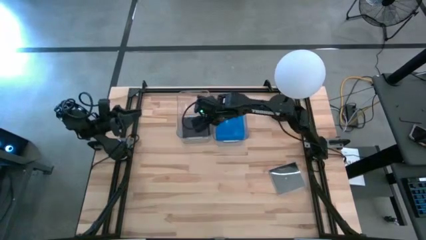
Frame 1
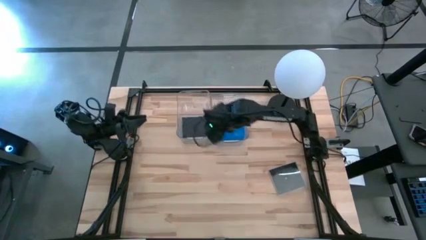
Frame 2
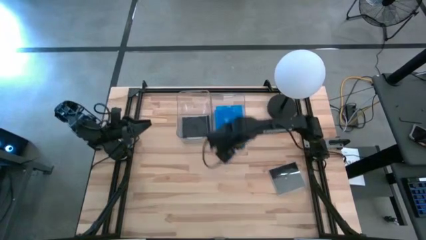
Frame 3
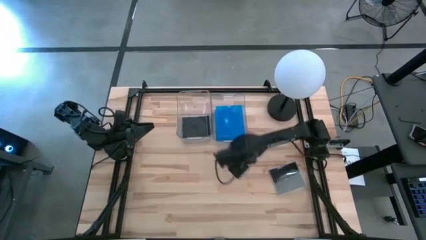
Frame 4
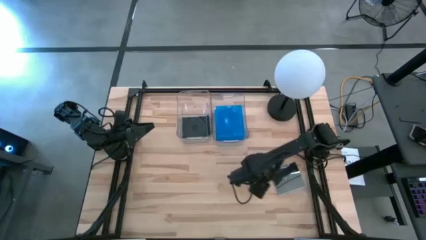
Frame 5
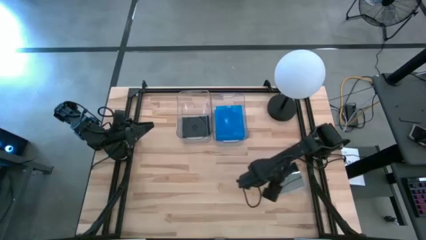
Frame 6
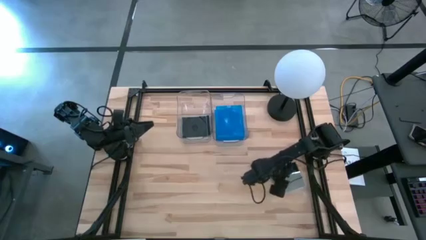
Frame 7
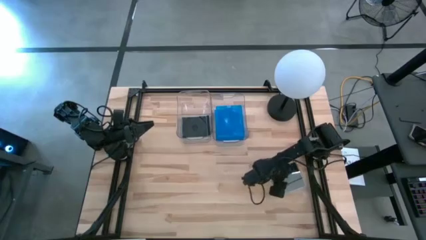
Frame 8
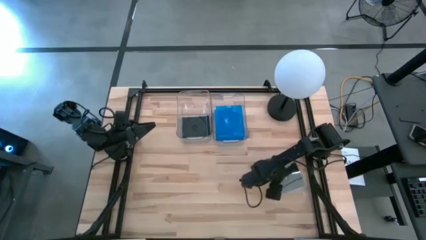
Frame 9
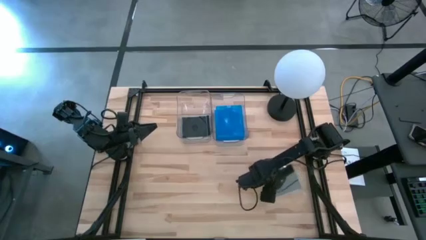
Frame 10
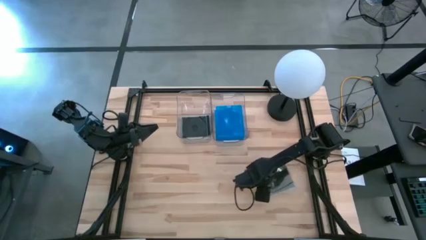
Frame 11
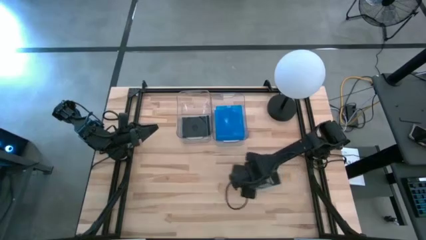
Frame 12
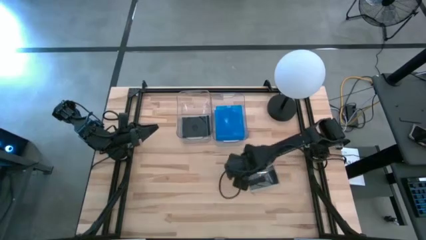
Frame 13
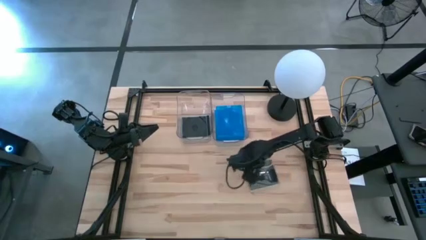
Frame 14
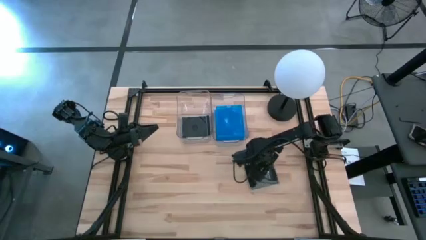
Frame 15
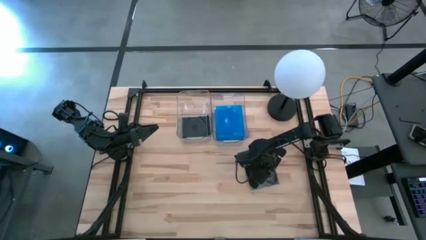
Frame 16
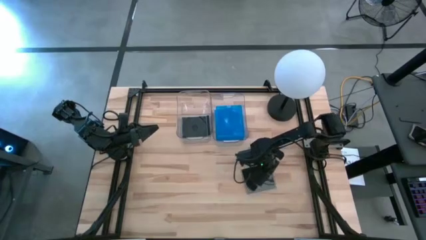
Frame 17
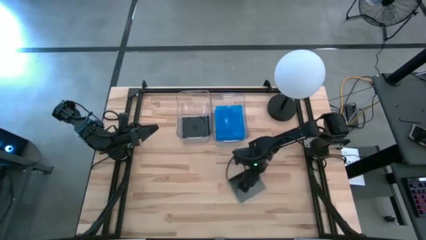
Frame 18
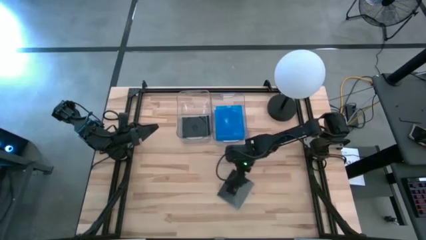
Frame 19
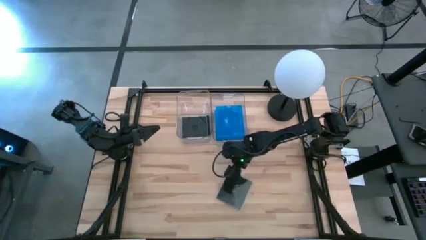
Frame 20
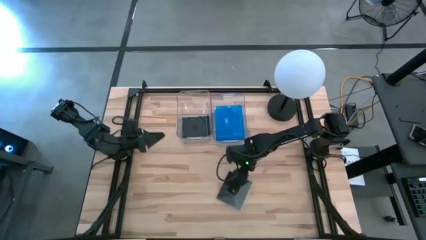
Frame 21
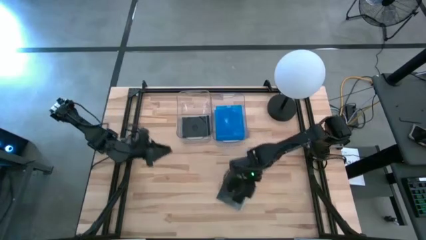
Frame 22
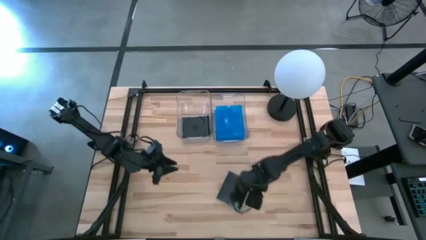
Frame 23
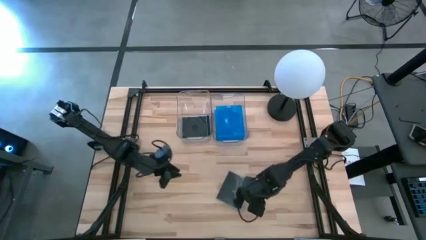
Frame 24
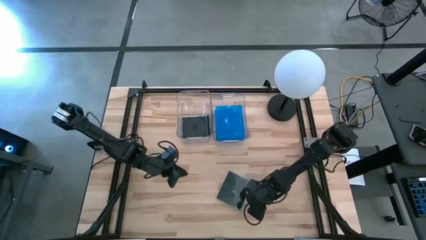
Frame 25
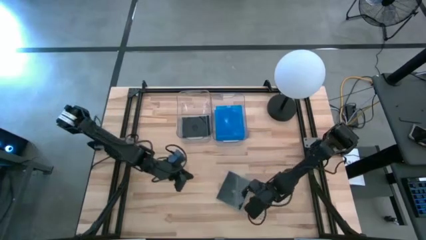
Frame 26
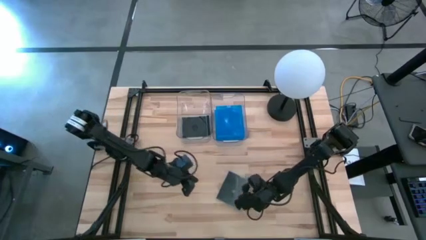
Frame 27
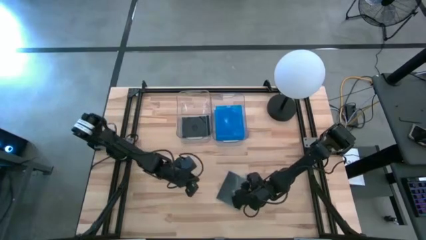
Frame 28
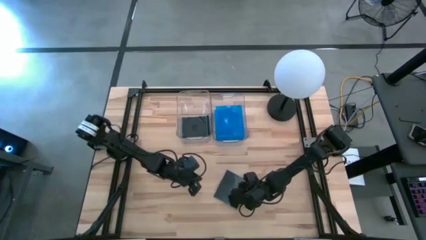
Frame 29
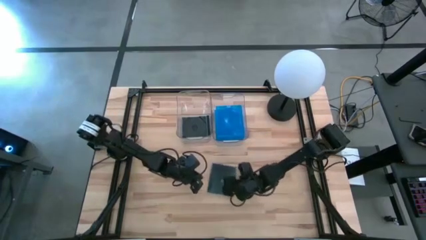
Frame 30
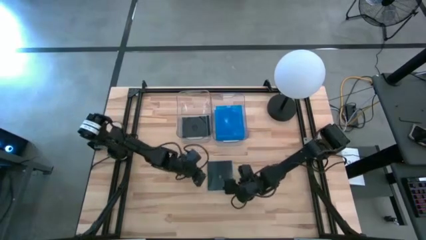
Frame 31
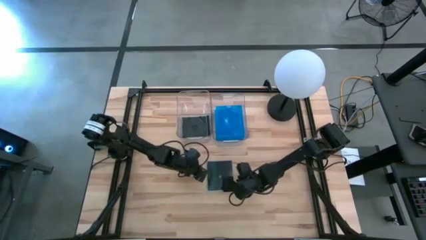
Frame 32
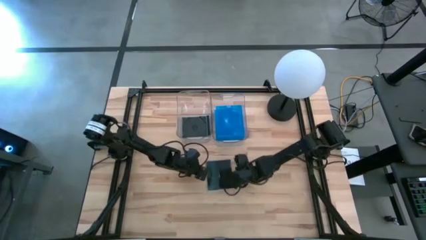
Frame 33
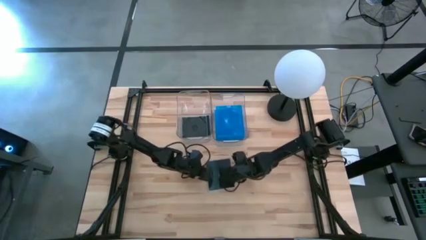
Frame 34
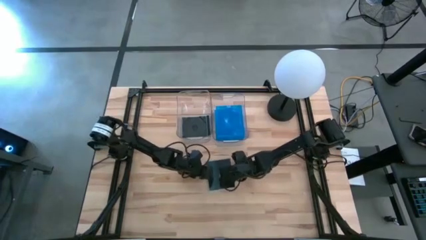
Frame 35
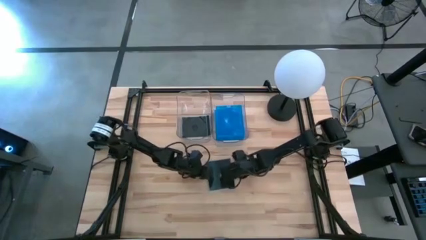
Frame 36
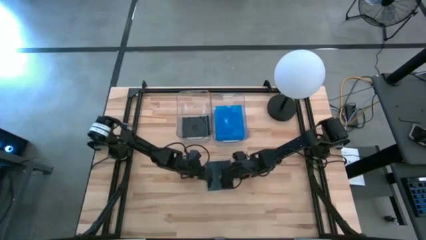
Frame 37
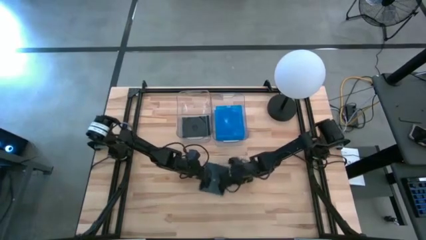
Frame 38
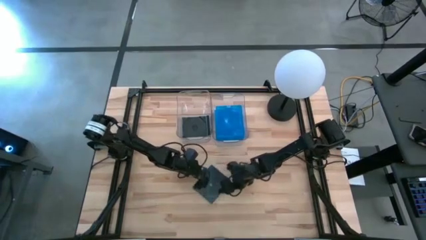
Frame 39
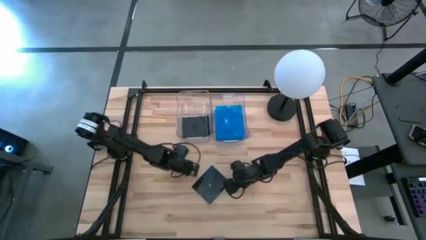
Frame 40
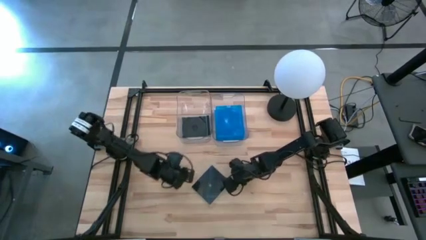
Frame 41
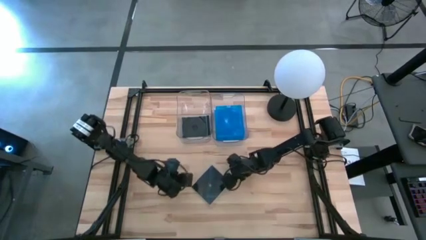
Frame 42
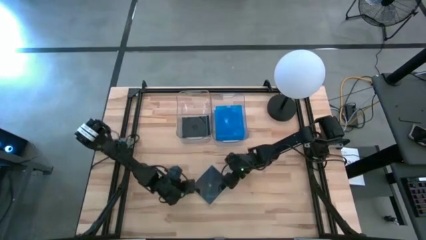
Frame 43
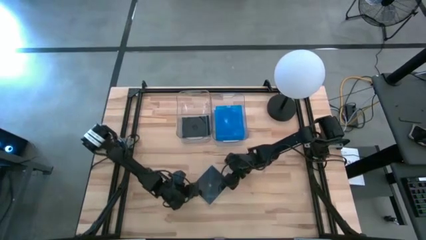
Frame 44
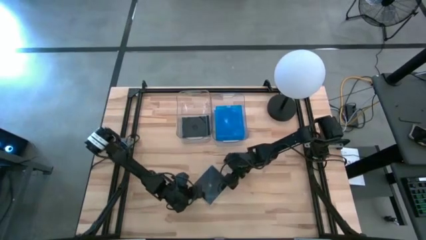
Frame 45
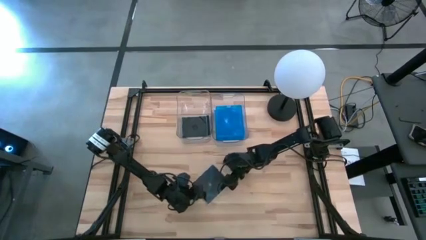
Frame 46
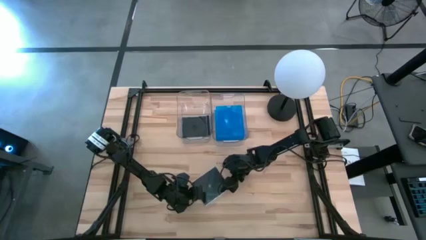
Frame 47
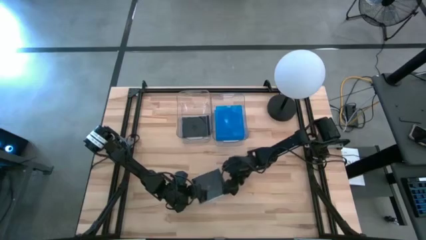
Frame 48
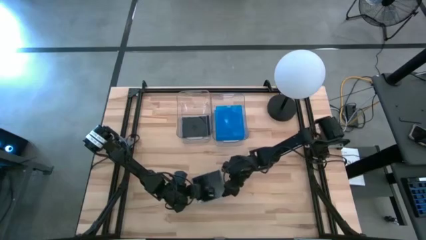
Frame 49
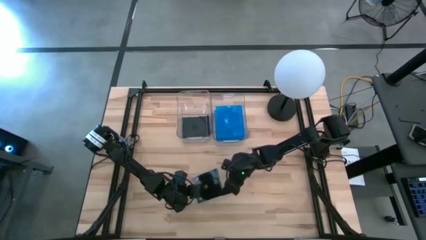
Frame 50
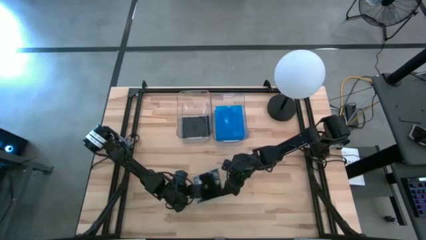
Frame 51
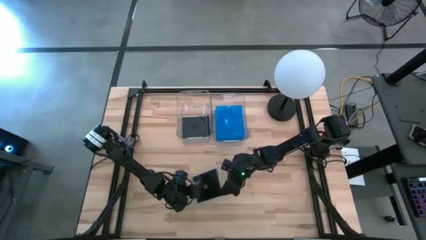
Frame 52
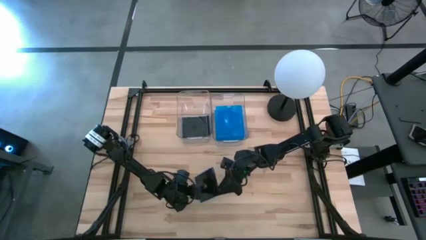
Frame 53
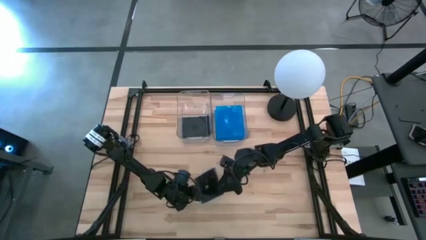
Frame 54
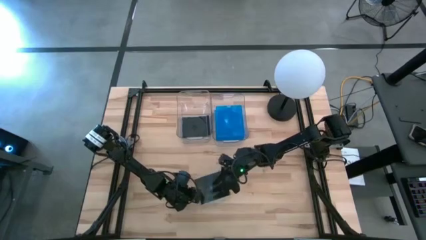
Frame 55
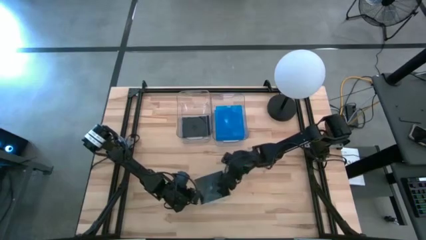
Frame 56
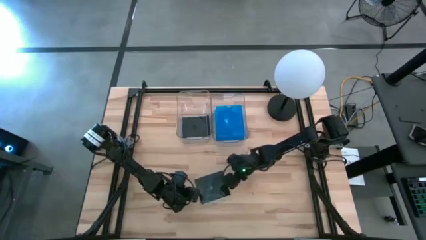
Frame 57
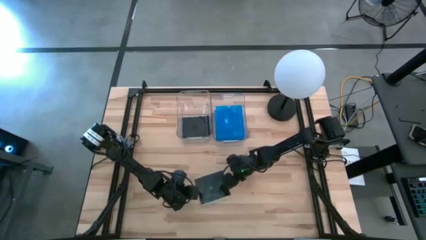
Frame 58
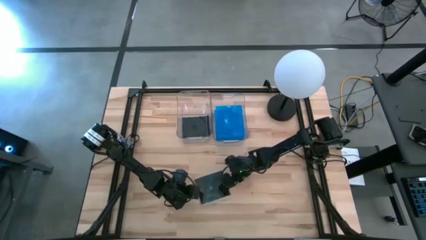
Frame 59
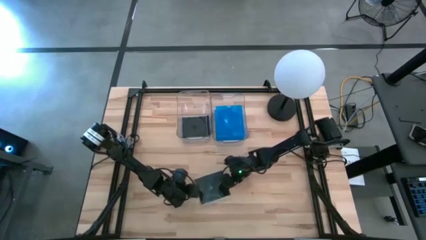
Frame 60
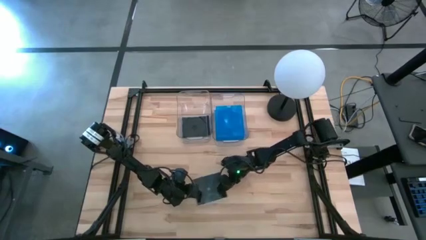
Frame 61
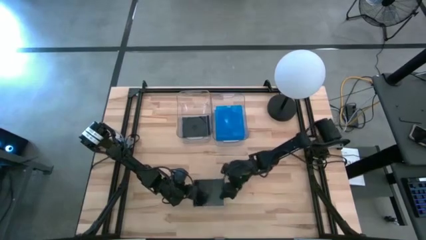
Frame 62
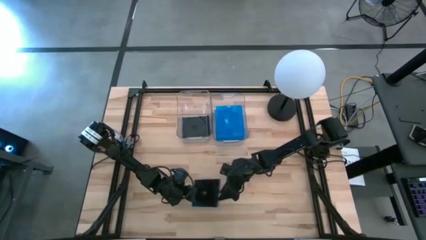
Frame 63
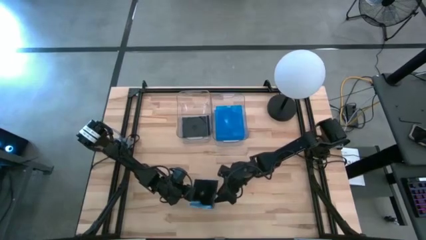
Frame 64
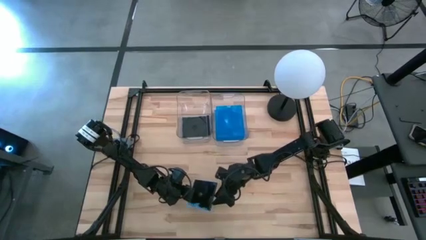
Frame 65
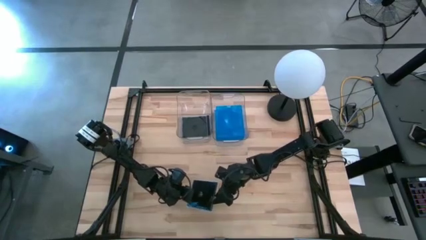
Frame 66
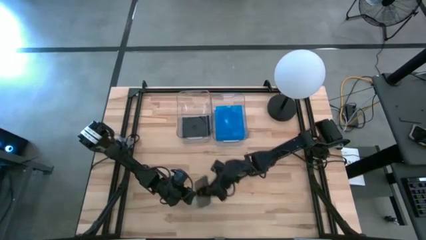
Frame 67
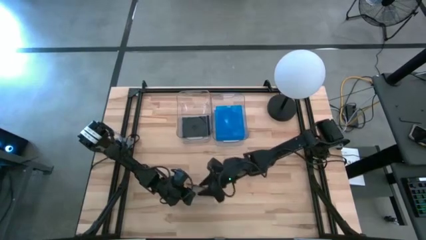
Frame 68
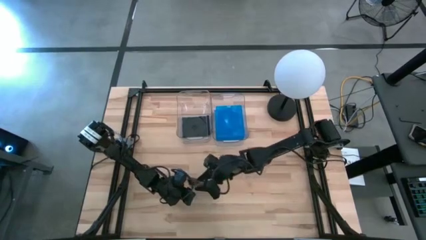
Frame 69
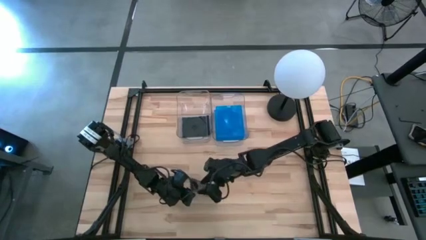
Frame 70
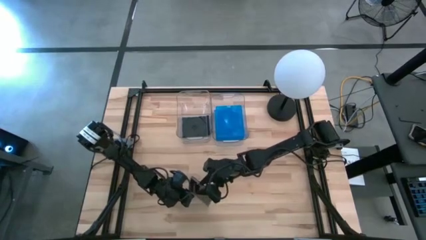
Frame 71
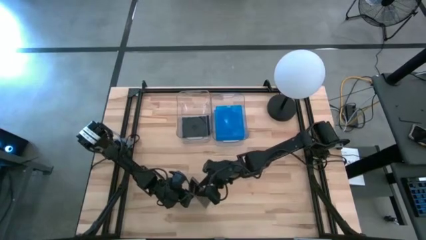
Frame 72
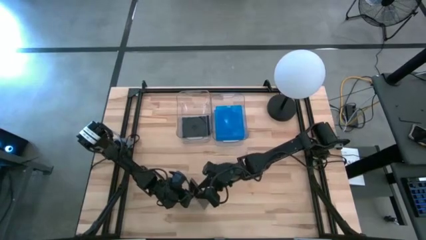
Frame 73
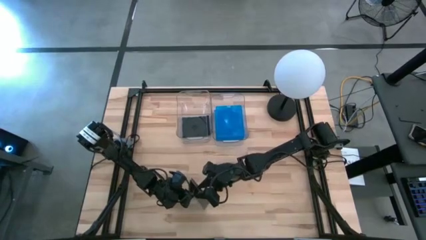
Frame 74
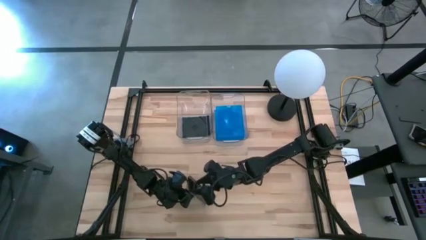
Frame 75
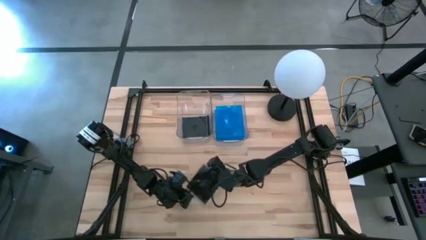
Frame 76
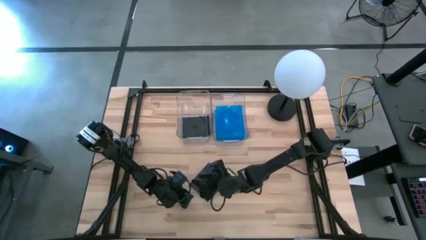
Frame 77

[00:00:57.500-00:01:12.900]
Task: Pick & place jewel cases by type
Put the black CD case into the left transparent bin
